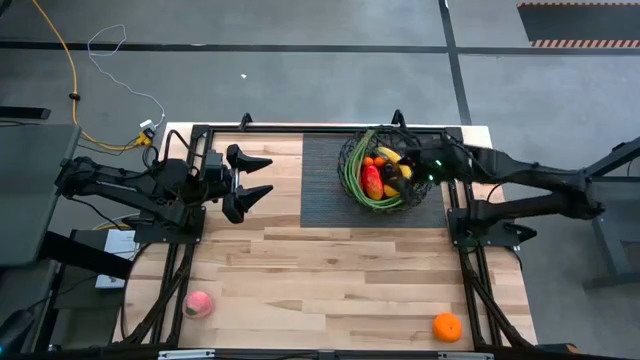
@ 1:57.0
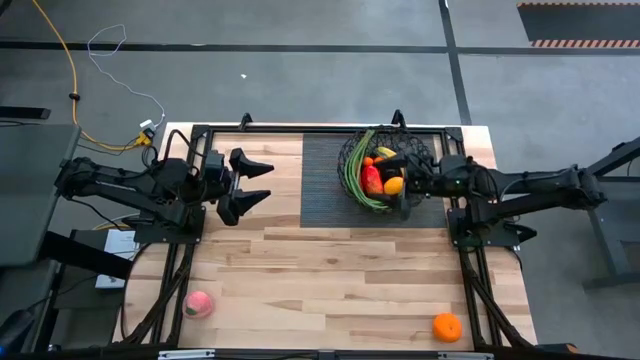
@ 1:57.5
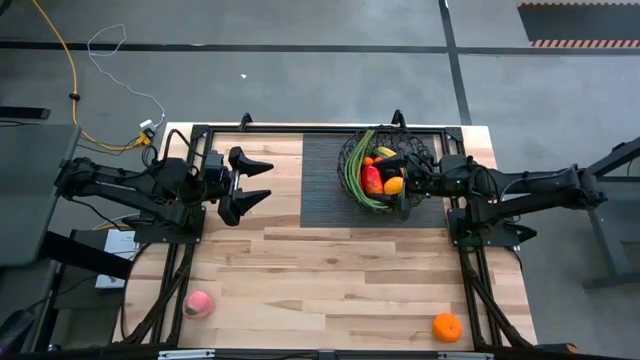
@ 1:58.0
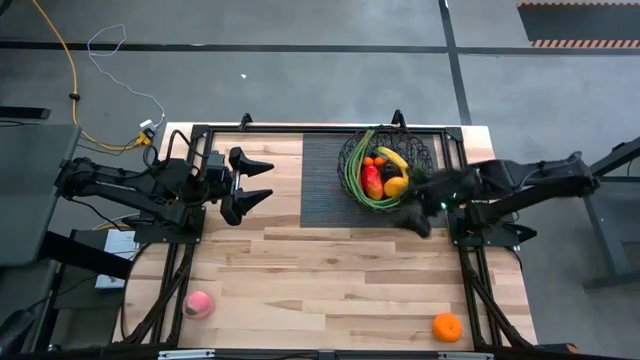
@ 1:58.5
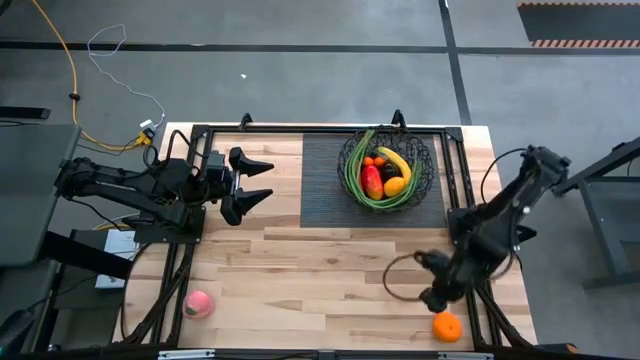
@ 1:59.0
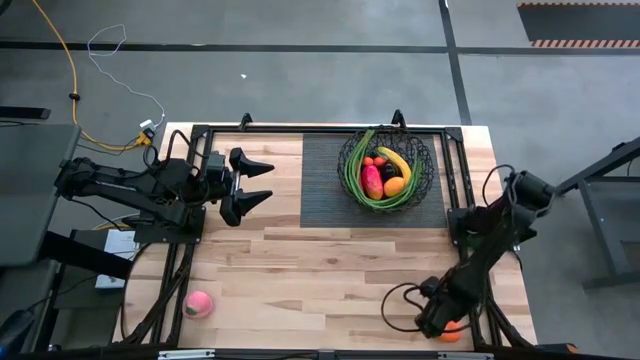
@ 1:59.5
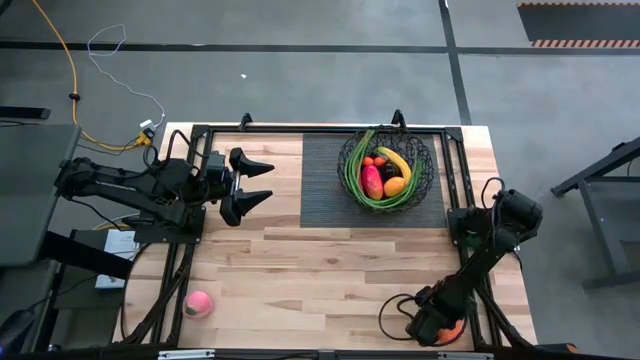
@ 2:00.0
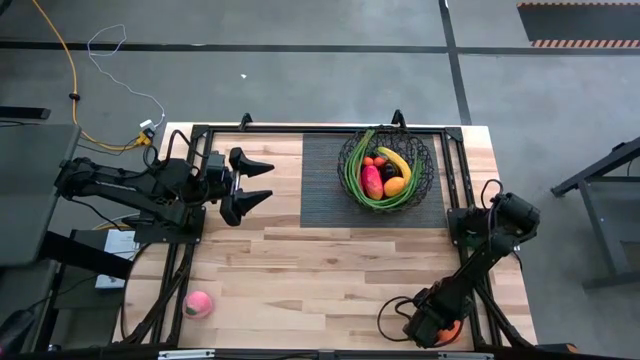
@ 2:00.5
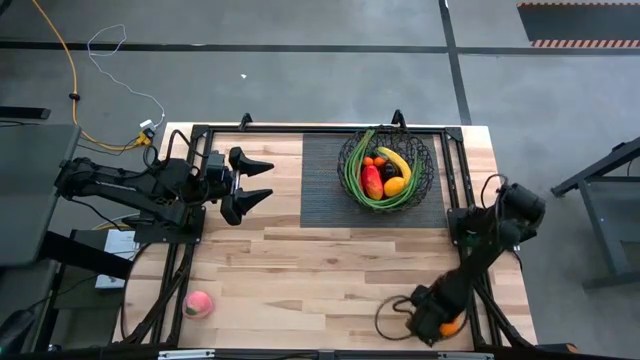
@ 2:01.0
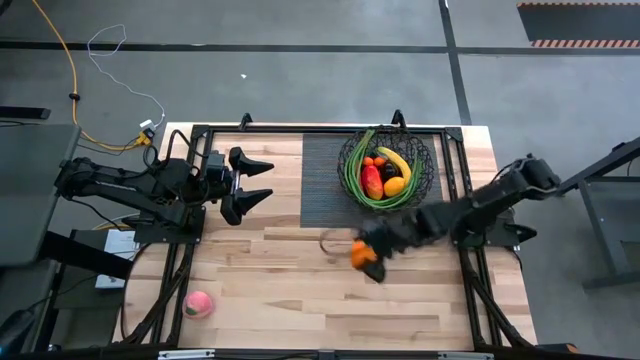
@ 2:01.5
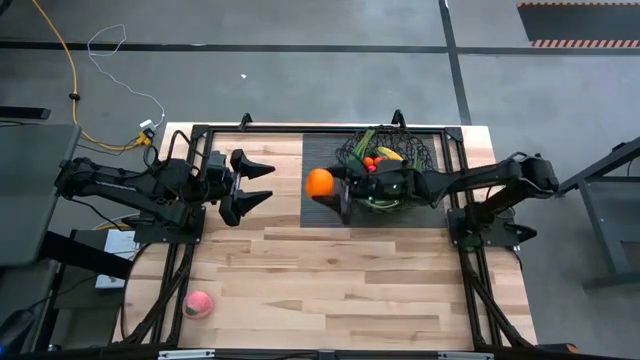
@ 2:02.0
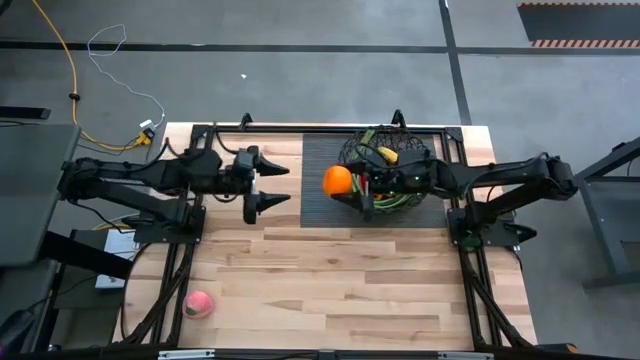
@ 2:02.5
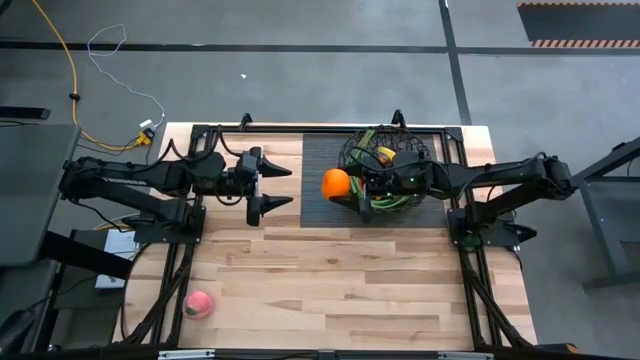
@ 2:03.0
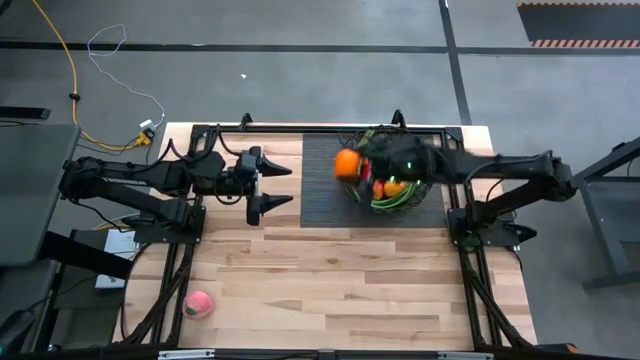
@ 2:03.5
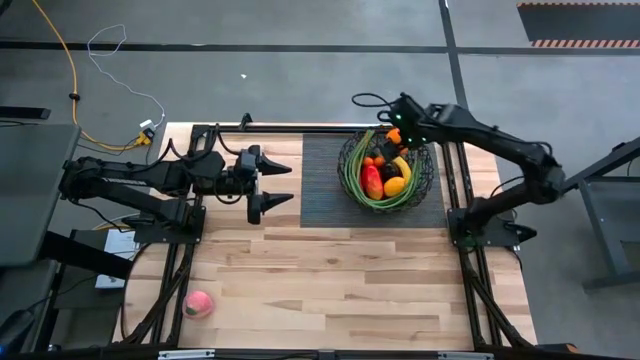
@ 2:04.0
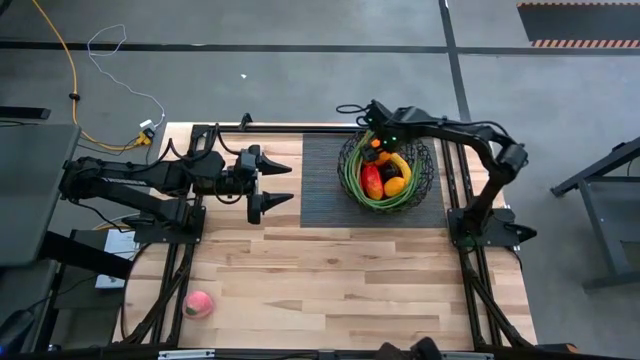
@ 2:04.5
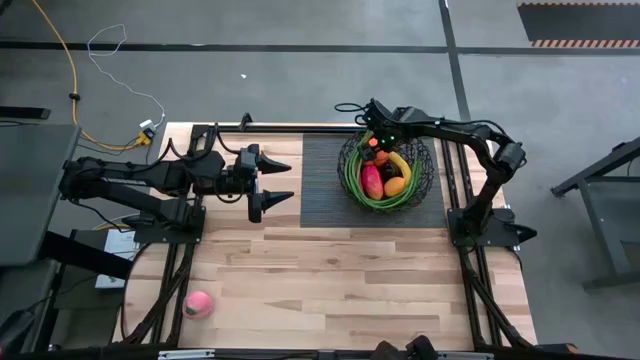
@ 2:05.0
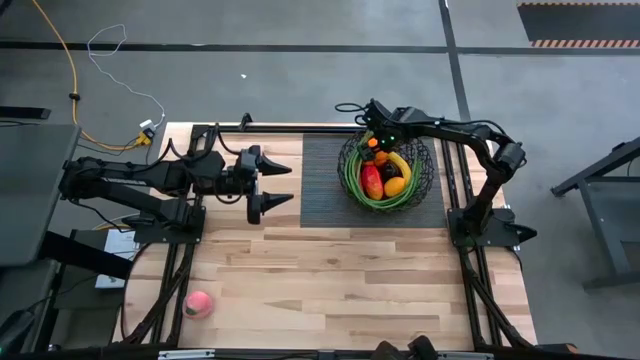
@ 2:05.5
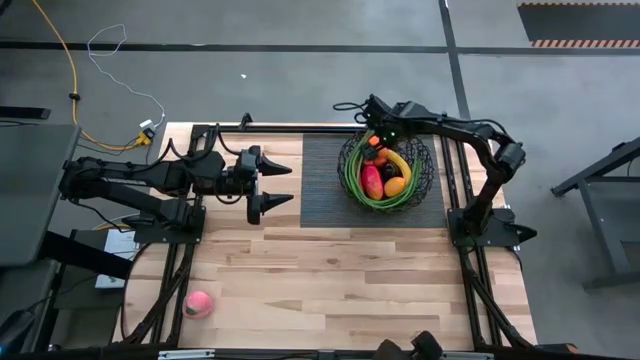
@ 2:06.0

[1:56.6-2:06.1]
Task: Build produce basket
Put the orange into the black basket

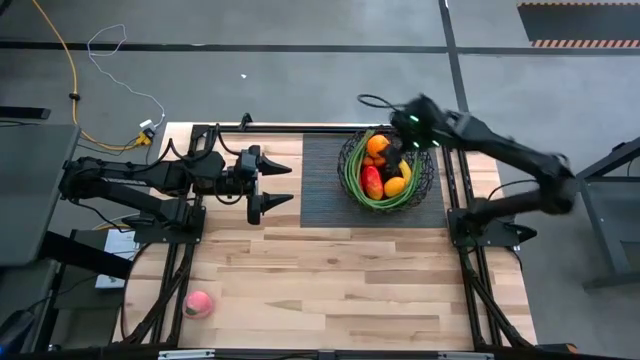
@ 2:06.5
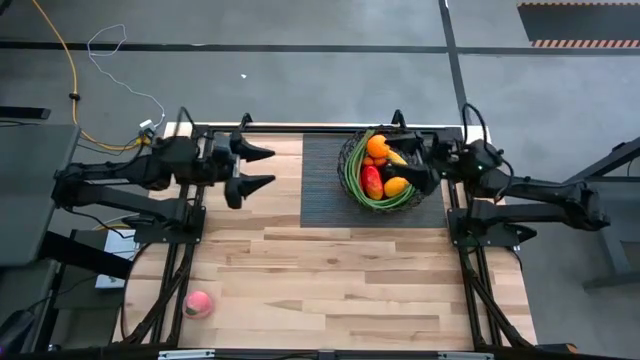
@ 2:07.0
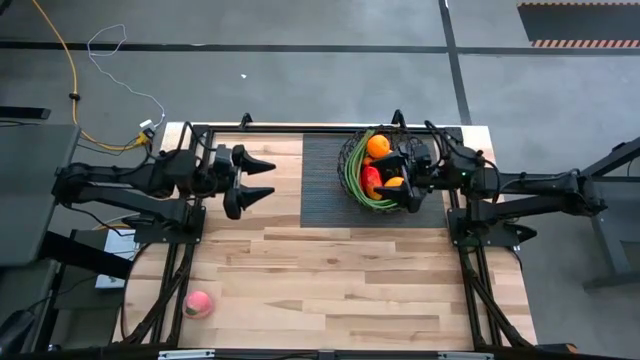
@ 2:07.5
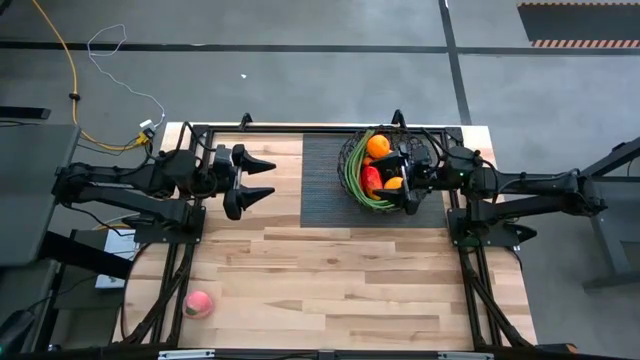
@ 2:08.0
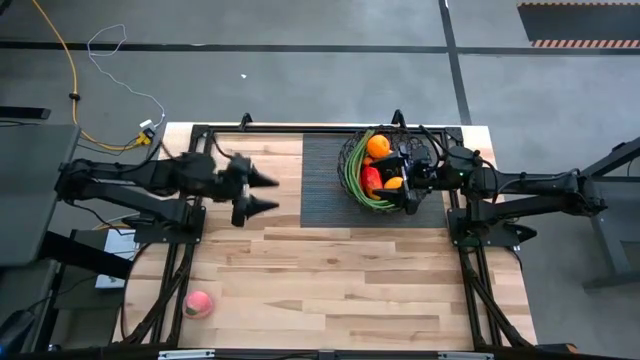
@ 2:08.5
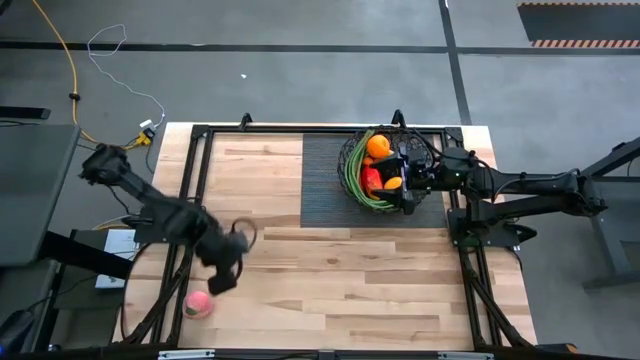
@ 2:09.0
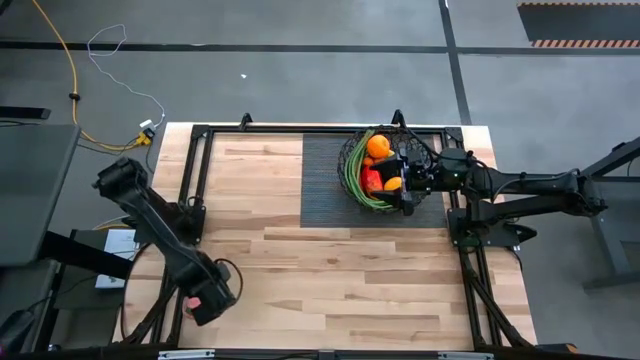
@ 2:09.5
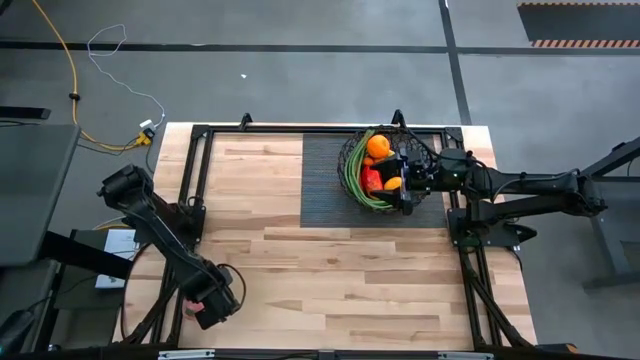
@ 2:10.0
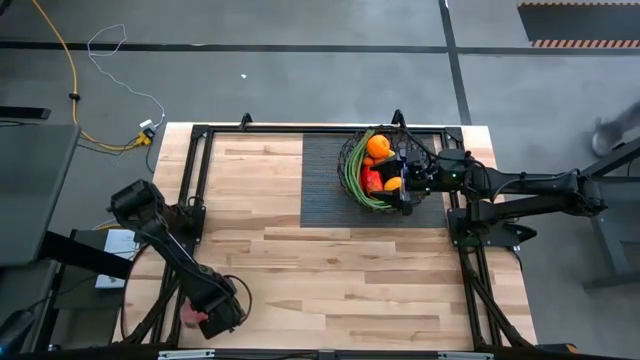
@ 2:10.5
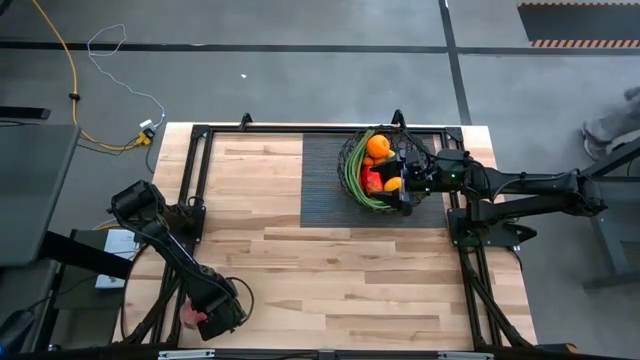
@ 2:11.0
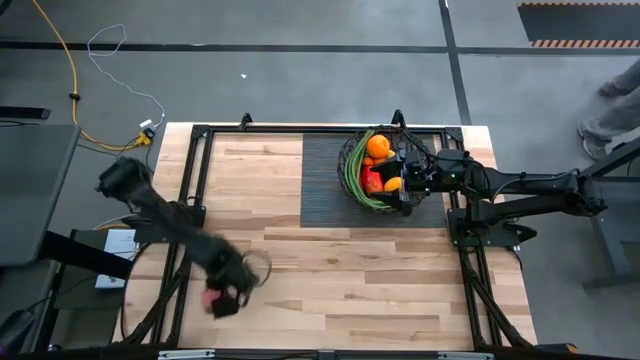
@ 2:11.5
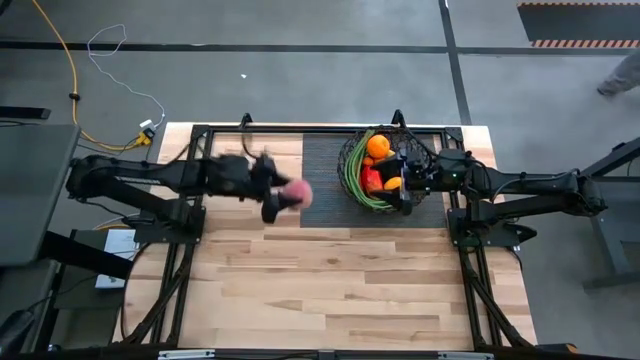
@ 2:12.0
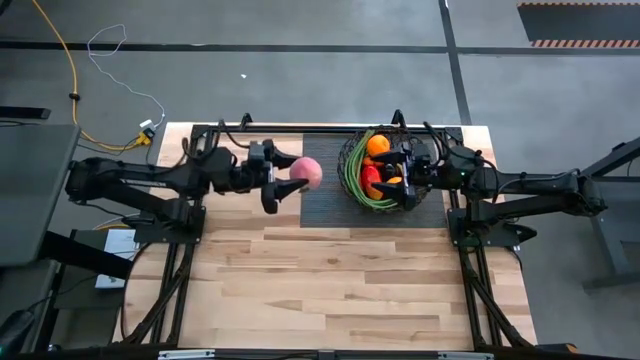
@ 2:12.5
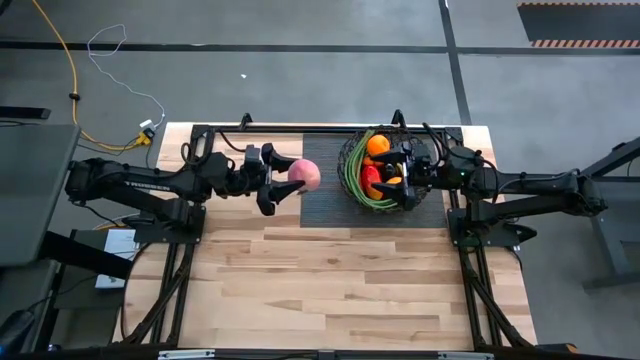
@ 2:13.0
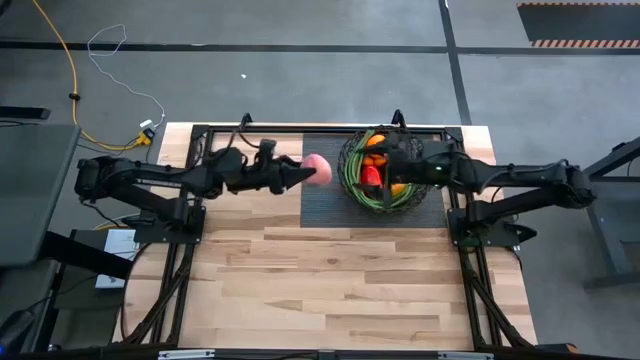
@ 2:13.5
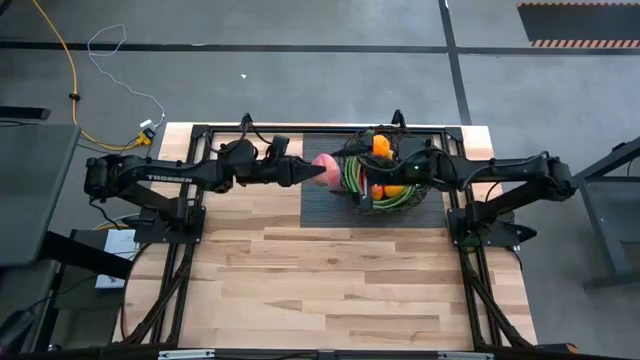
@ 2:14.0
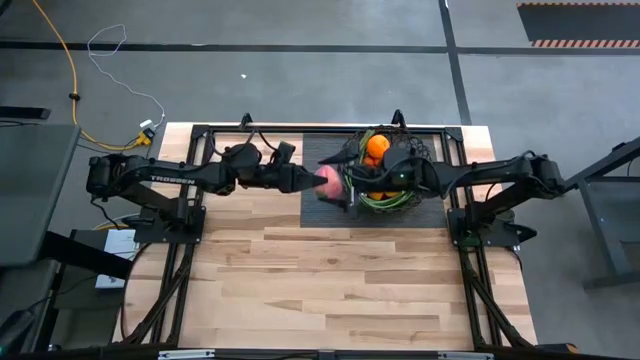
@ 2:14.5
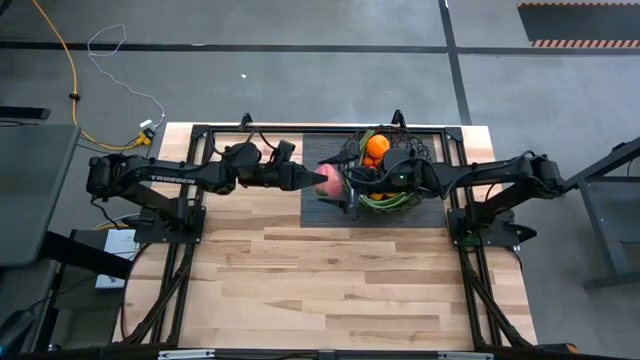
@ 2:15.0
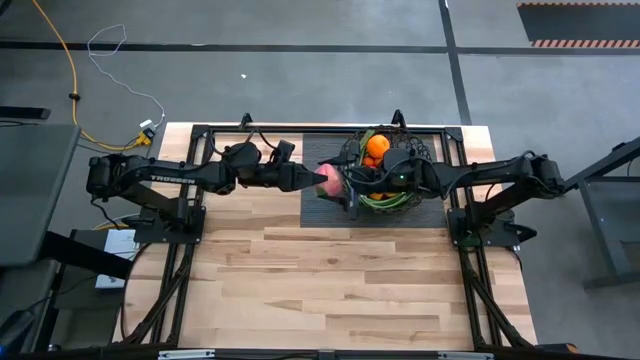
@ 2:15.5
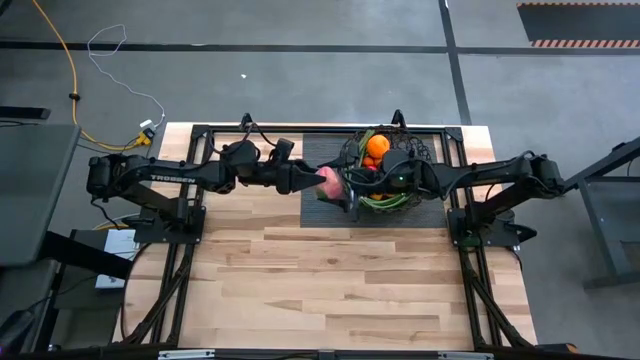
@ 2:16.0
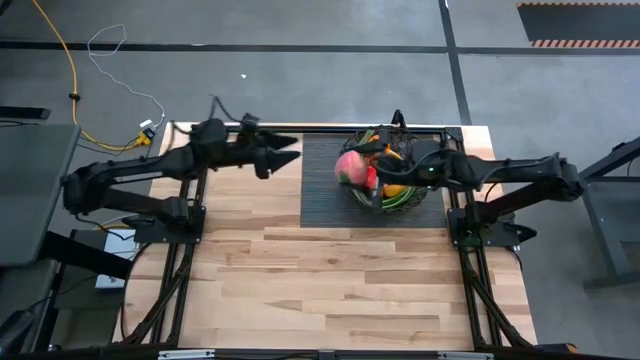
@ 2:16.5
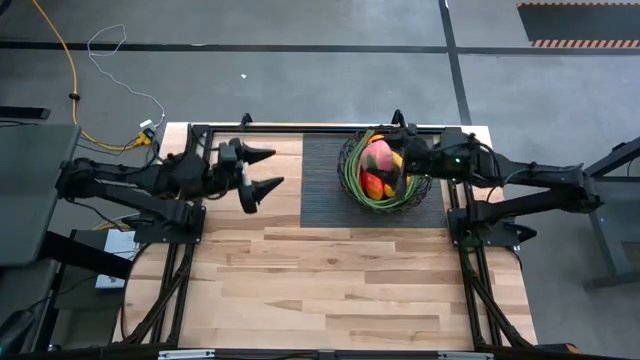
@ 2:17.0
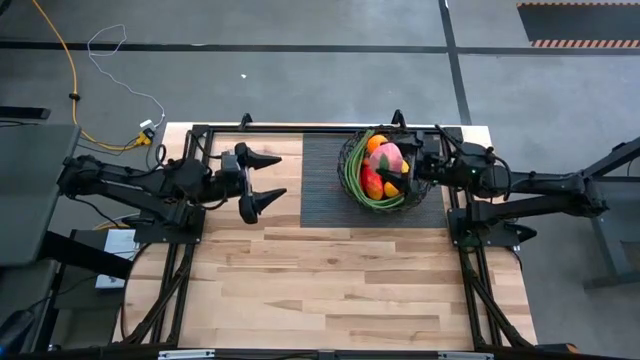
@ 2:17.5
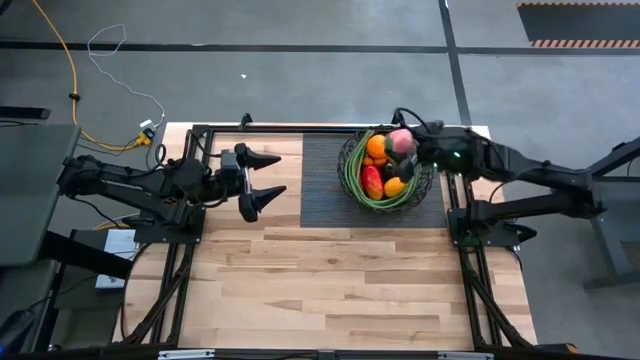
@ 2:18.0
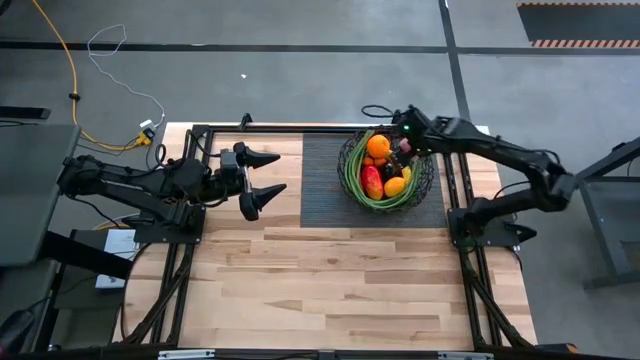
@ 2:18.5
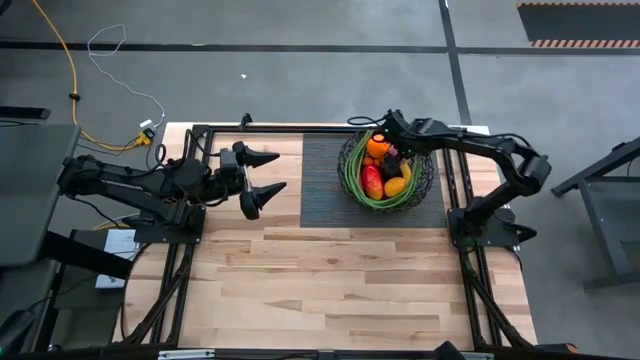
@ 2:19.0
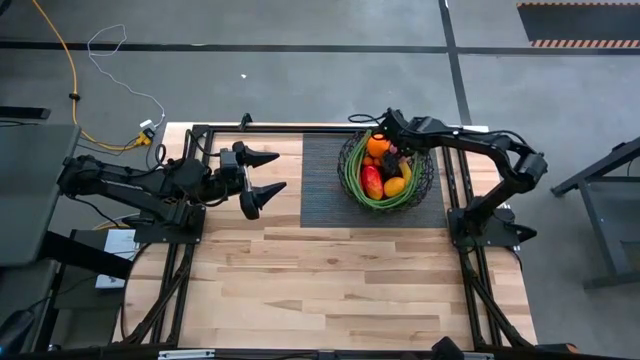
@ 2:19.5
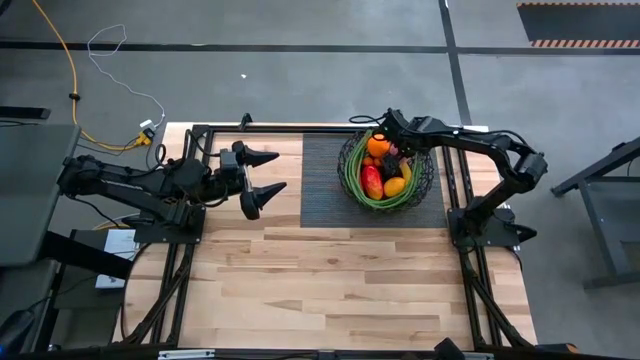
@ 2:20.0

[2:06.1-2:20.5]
Put the peach into the black basket
